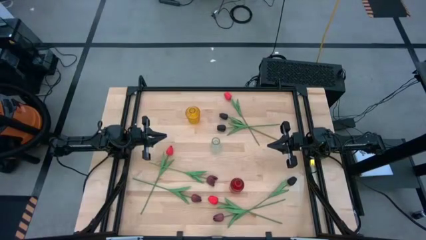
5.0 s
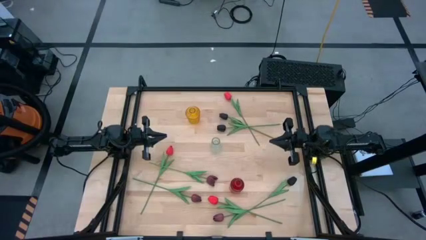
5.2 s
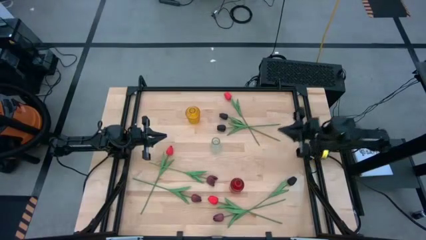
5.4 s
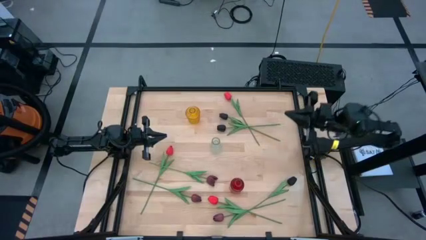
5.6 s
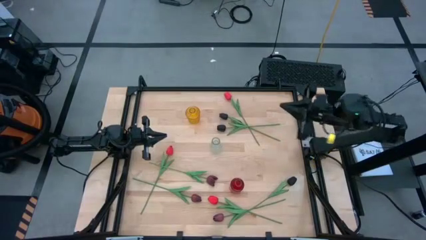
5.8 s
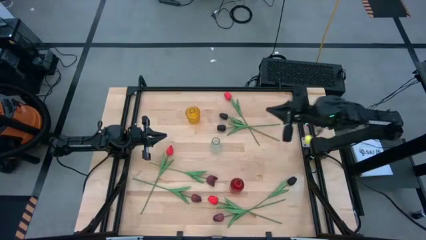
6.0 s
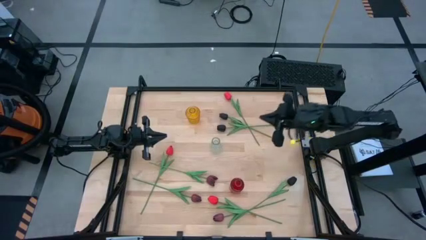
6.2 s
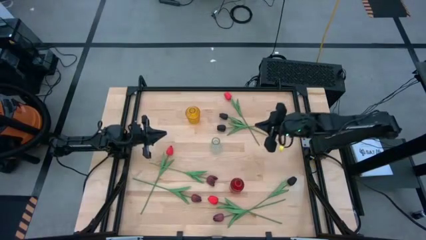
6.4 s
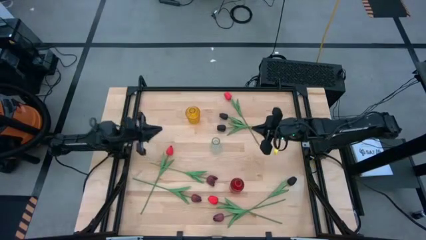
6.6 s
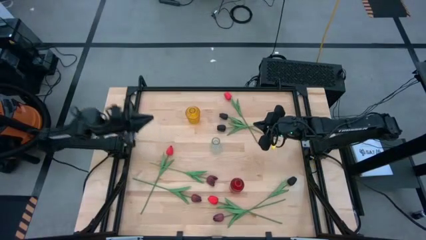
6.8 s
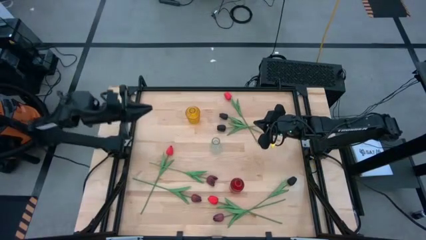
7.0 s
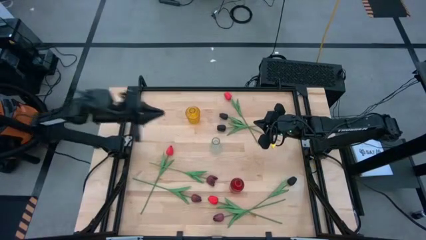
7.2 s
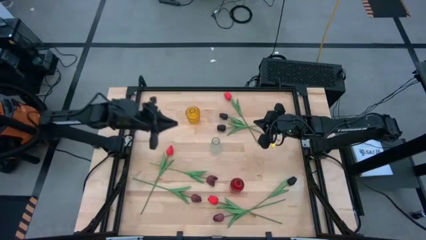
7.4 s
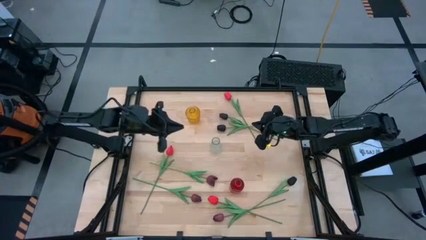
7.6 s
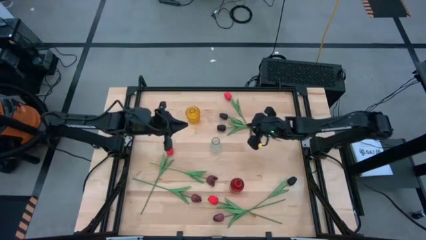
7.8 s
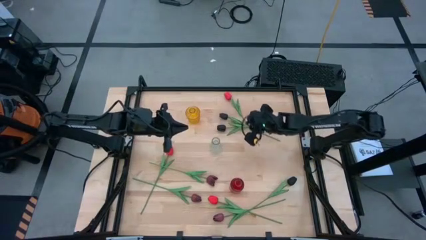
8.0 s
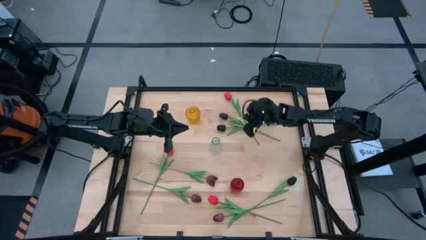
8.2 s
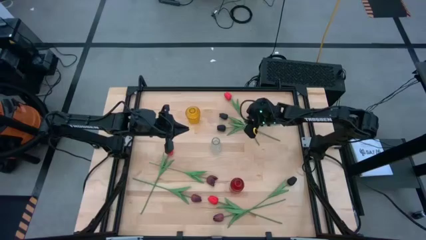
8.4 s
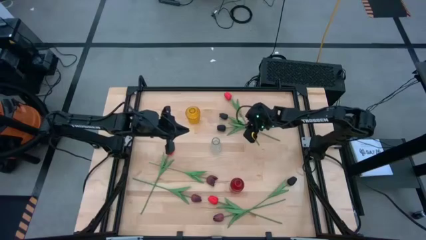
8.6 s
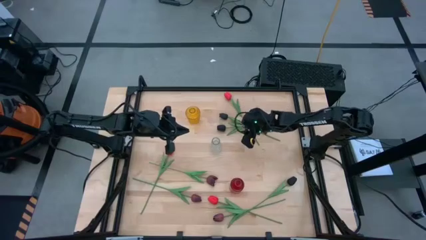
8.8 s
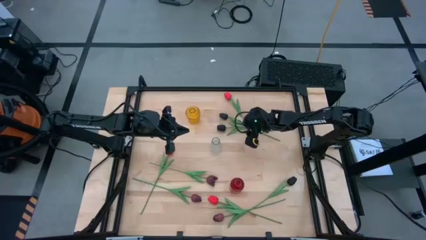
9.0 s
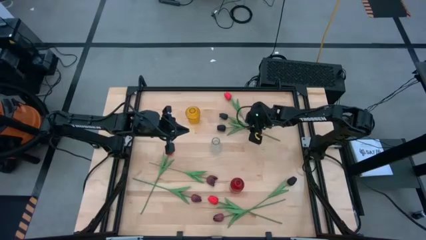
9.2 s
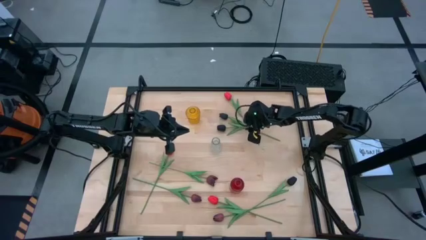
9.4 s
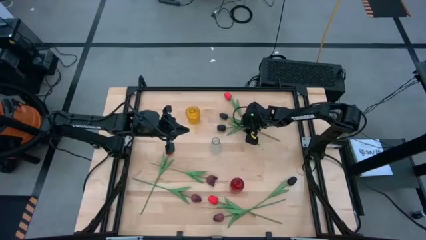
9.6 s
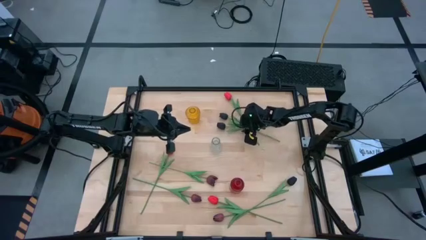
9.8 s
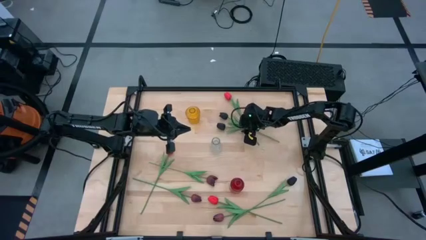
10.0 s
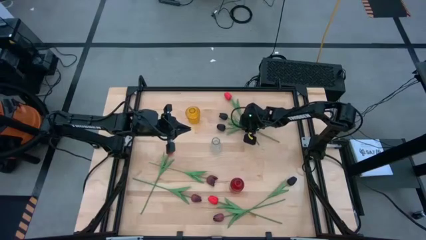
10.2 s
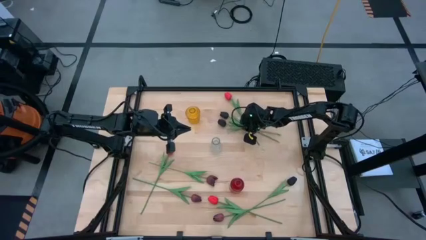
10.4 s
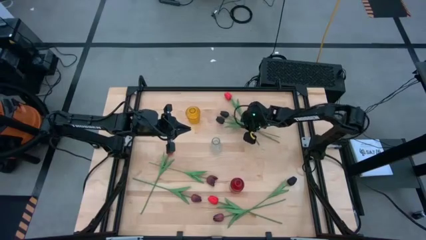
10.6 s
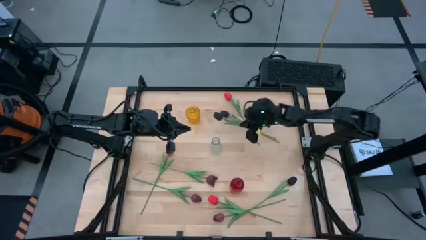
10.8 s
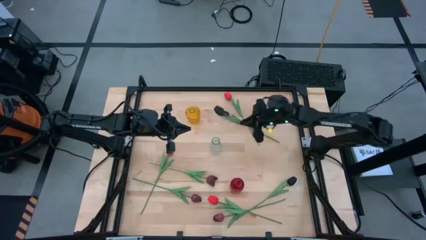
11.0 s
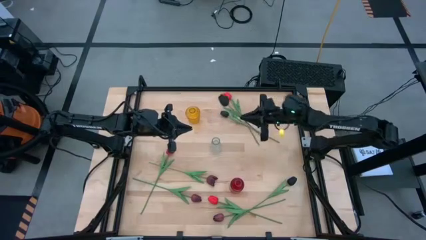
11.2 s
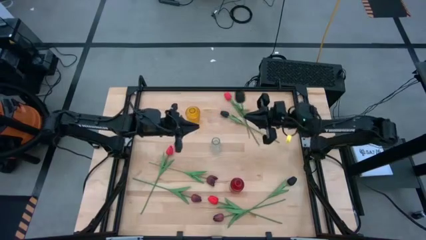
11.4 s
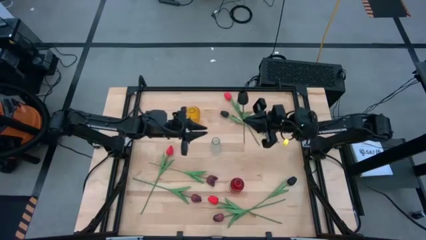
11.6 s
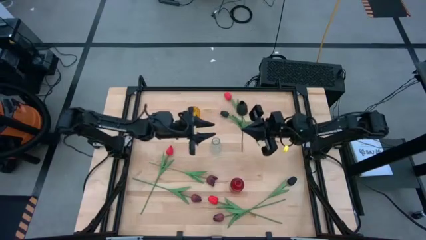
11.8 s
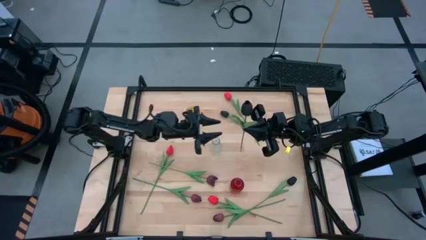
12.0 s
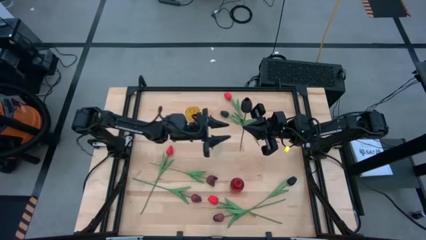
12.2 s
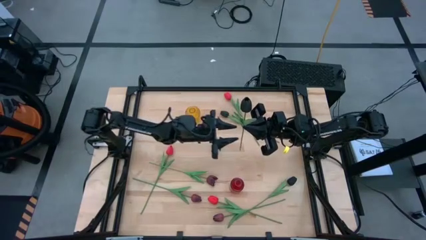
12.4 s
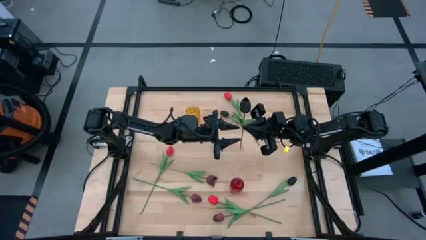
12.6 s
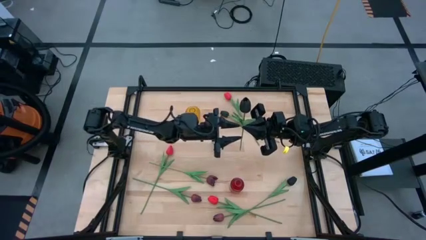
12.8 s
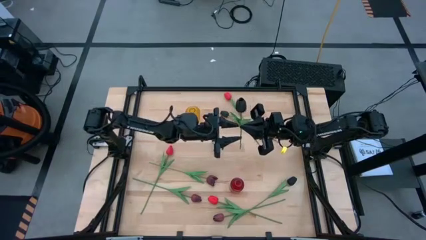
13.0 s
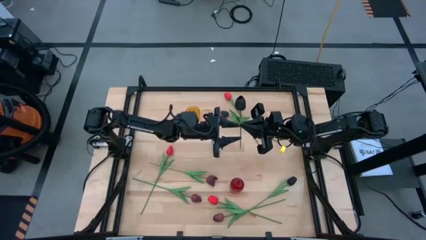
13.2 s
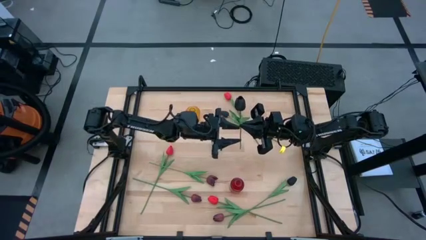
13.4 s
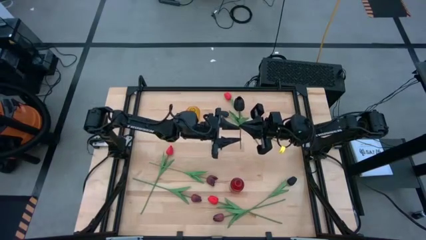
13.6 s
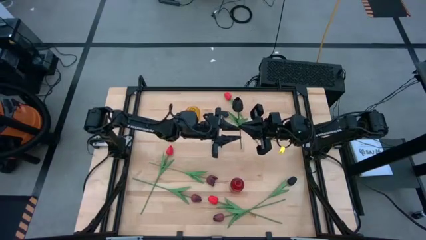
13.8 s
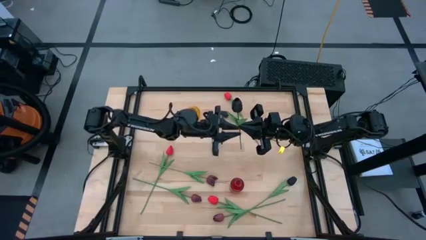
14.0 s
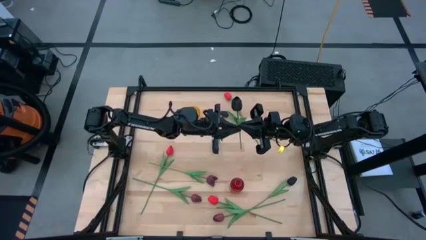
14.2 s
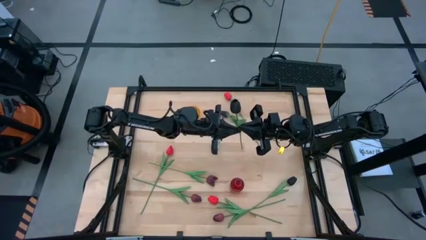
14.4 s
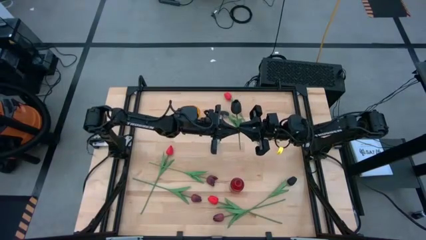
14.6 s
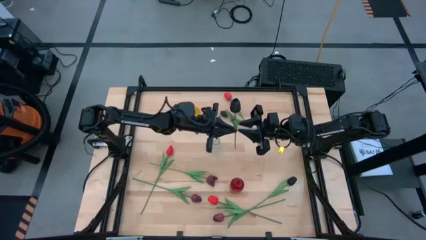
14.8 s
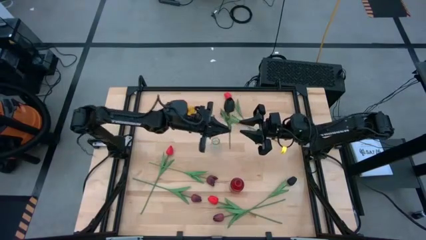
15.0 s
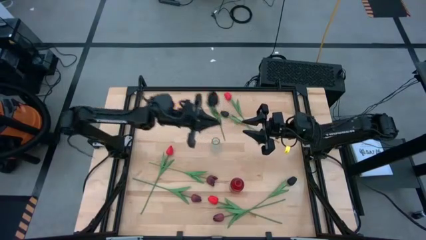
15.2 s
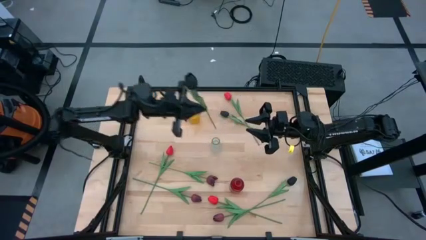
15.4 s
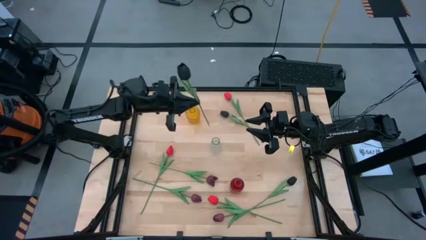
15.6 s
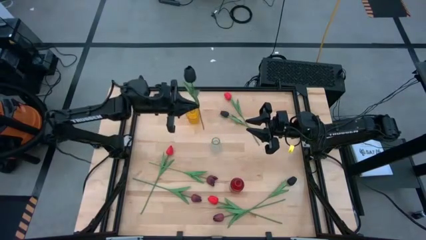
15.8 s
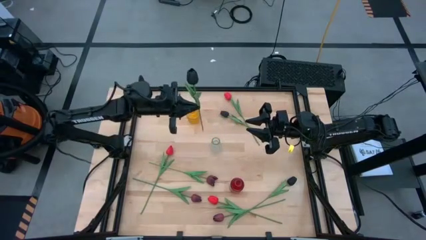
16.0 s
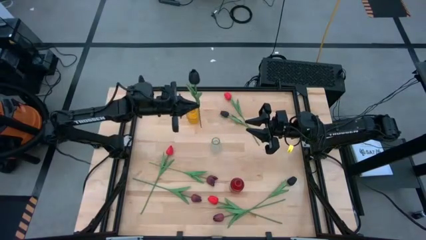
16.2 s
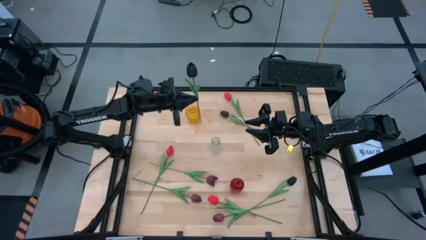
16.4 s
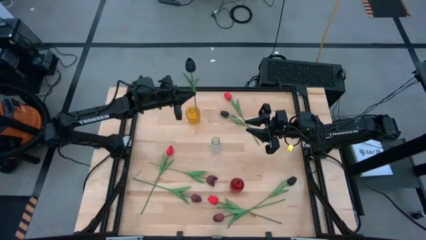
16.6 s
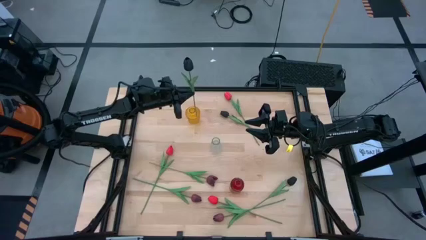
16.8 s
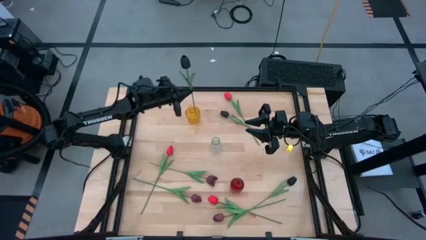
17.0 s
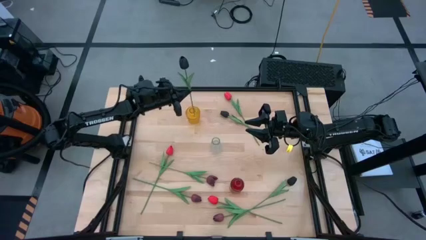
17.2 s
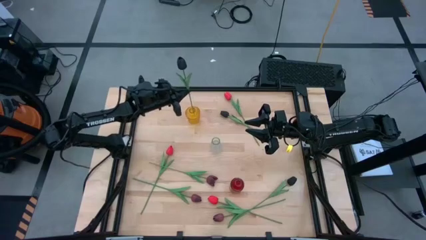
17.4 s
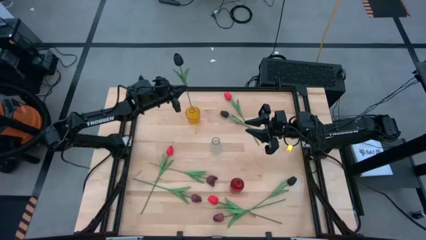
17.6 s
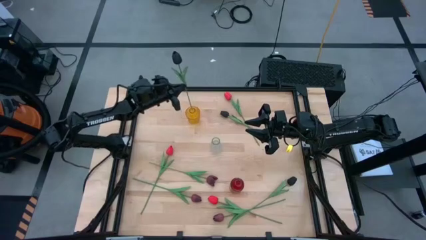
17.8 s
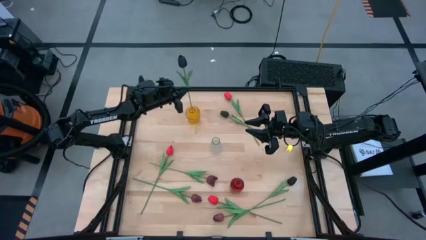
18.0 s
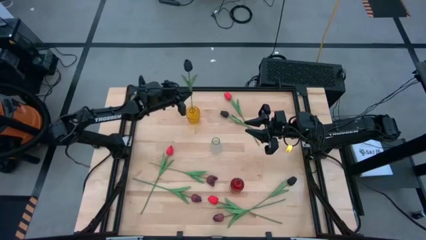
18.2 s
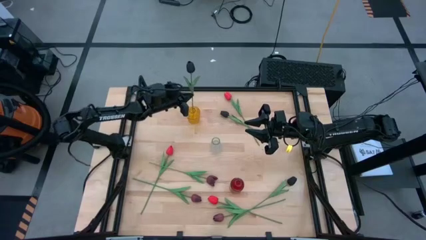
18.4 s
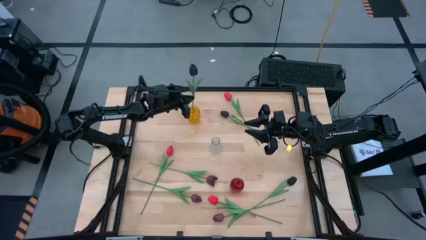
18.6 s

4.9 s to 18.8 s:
Task: Sort flowers into vase by color
Put the middle black tulip into the yellow vase
